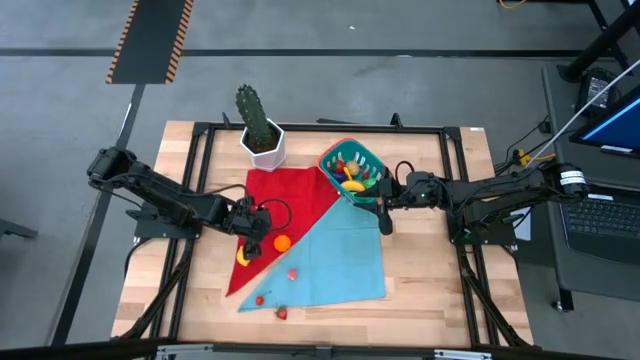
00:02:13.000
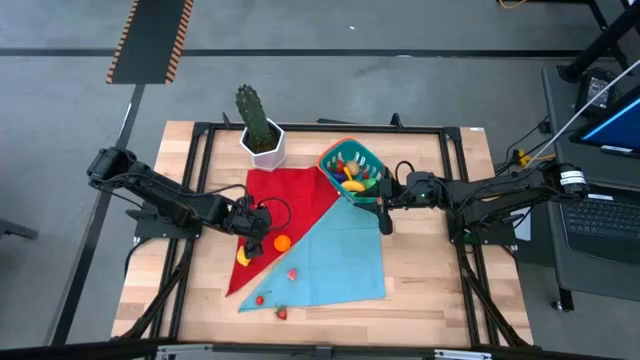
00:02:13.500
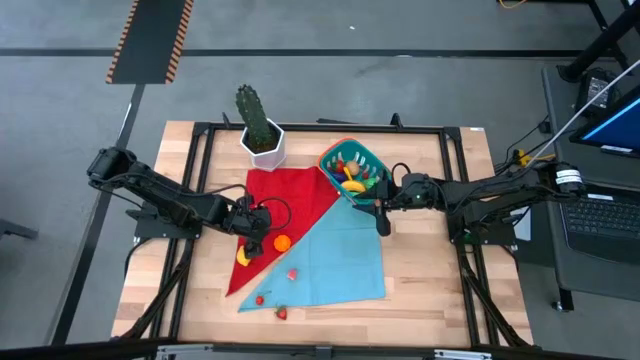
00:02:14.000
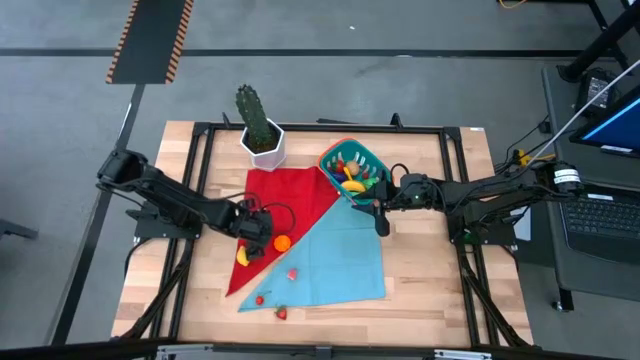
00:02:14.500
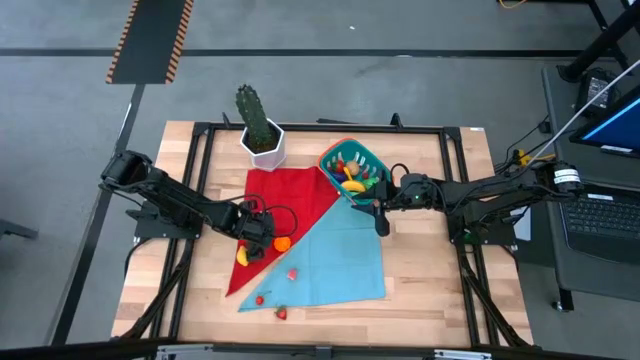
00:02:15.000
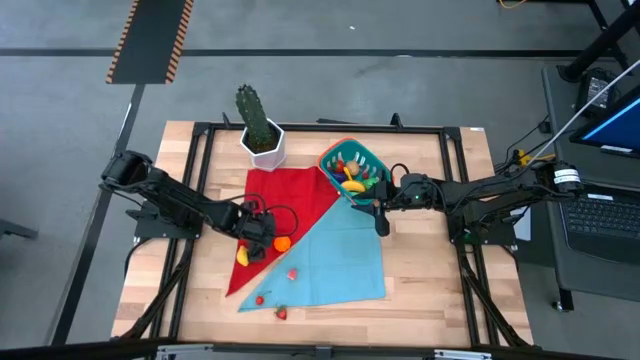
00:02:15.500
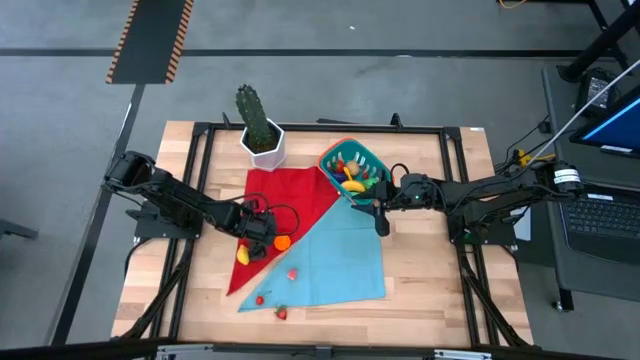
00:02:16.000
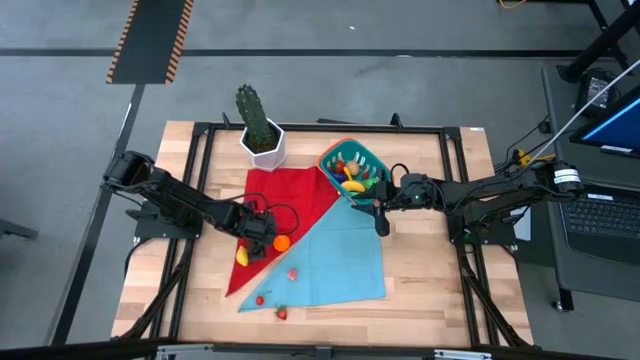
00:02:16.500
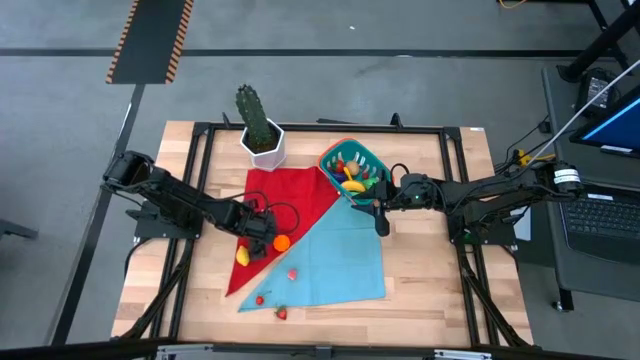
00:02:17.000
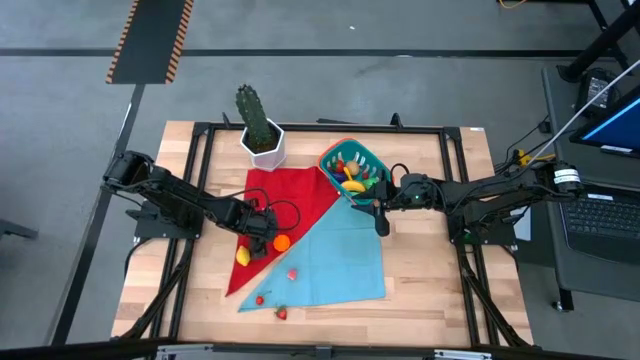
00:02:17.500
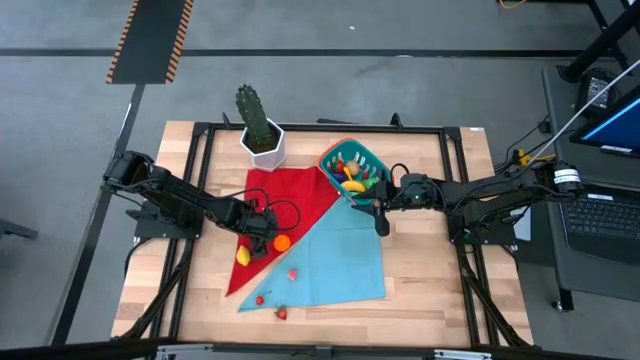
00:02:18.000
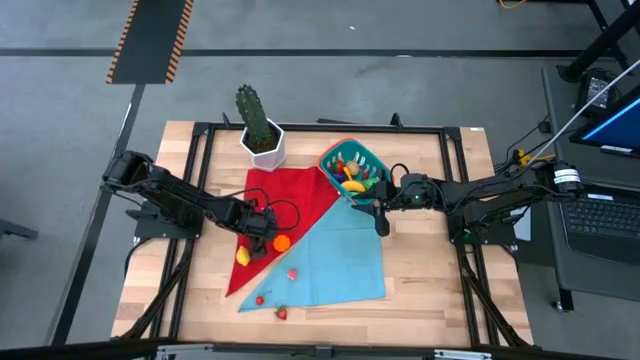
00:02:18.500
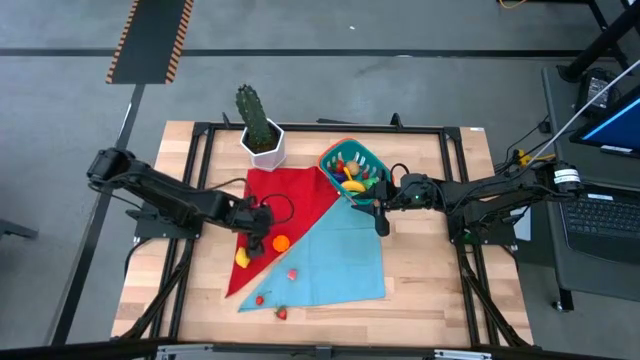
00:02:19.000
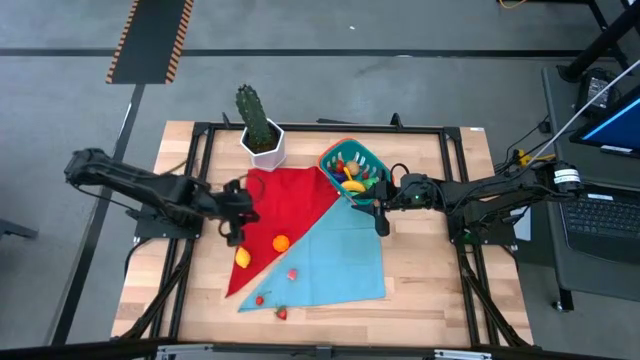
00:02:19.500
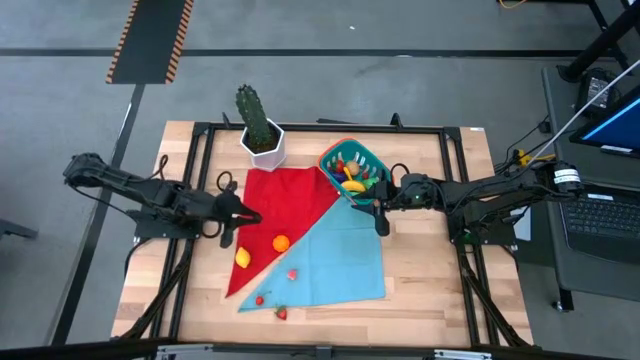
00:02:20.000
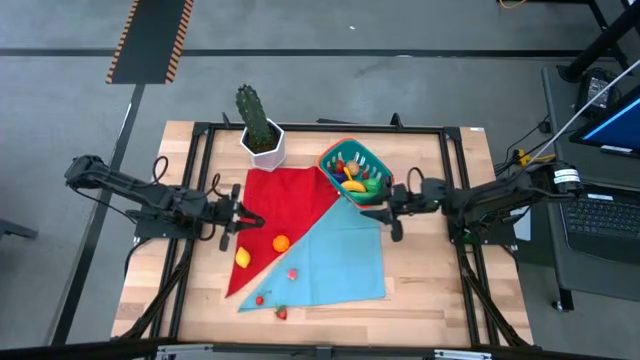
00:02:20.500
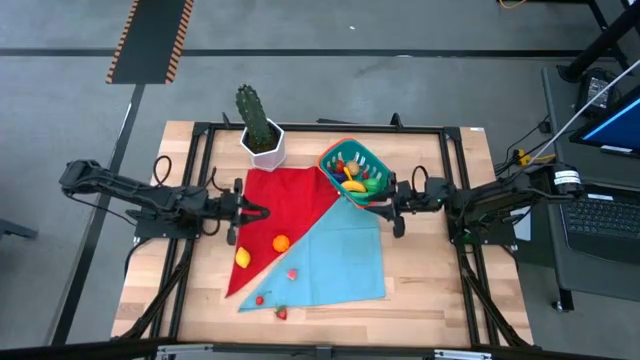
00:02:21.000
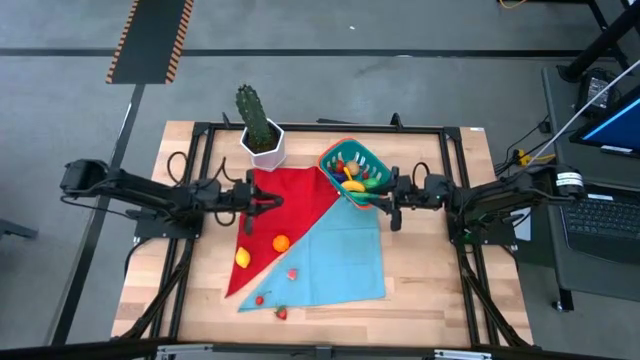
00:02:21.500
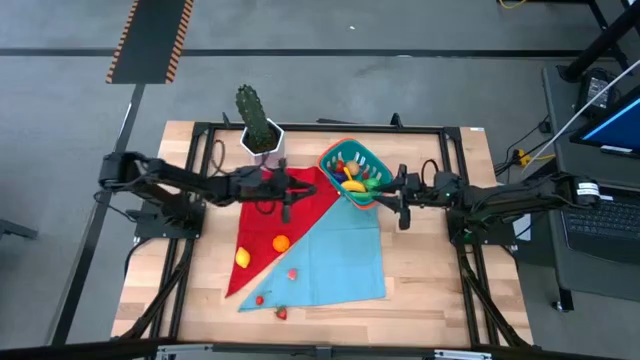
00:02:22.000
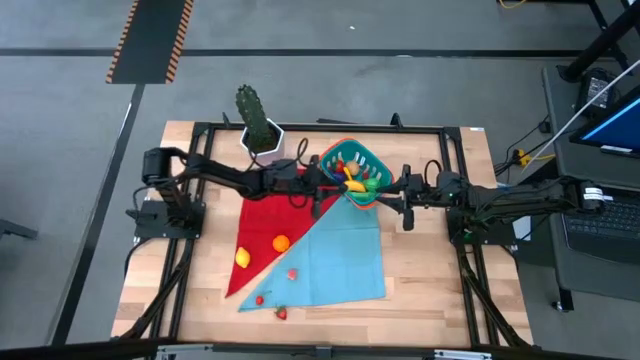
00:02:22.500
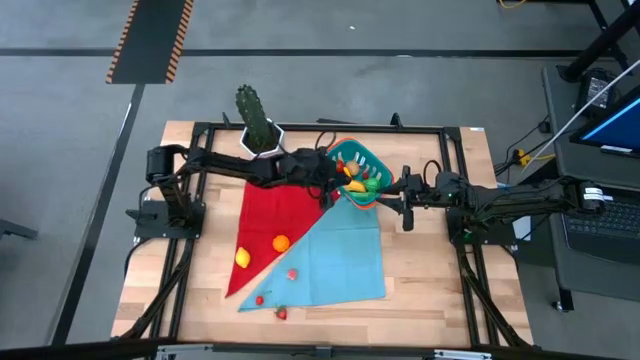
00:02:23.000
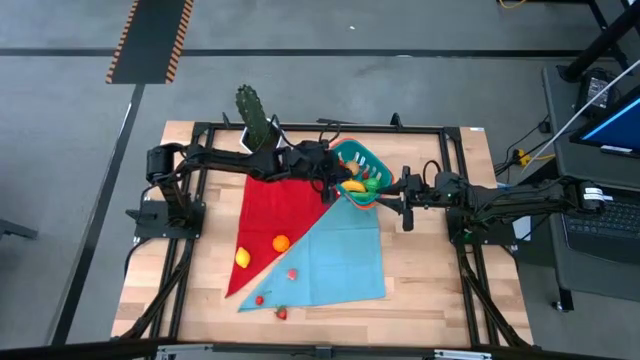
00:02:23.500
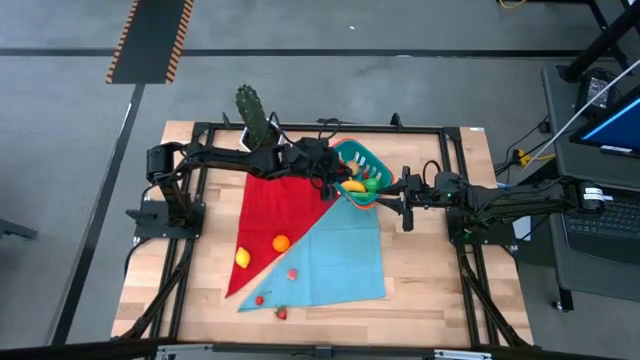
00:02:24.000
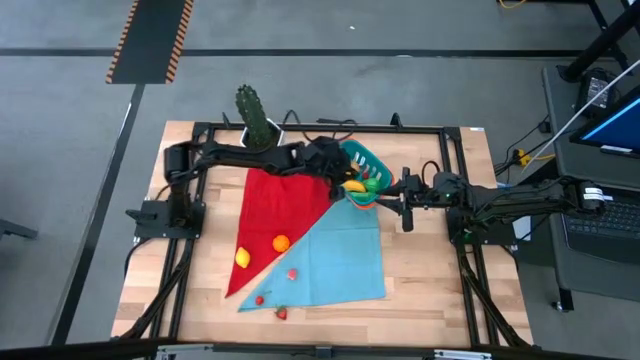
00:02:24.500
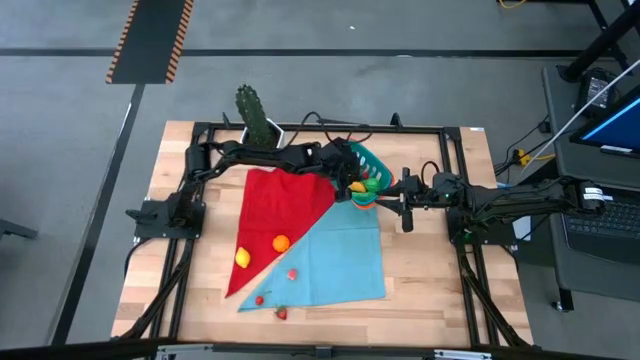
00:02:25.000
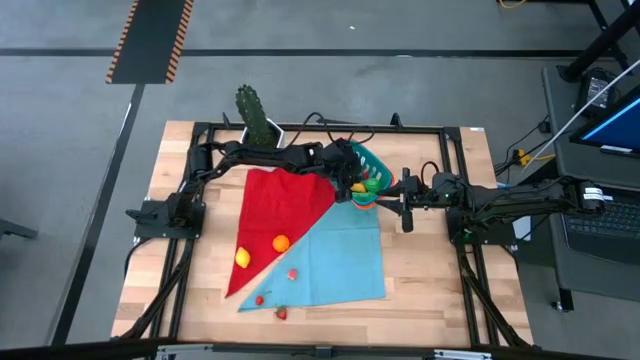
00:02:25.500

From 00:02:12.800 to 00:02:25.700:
Task: Build produce basket
Put the black berry into the blue basket

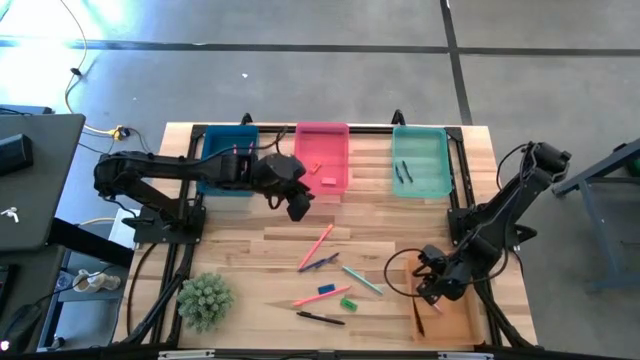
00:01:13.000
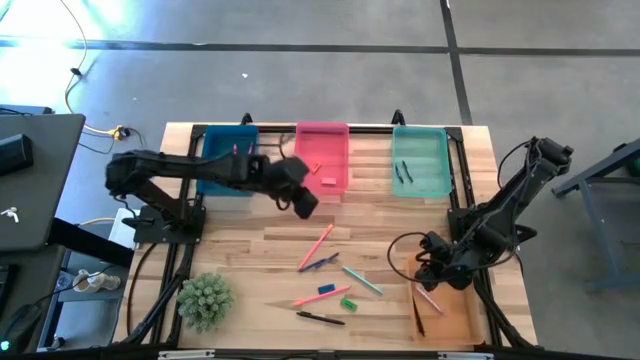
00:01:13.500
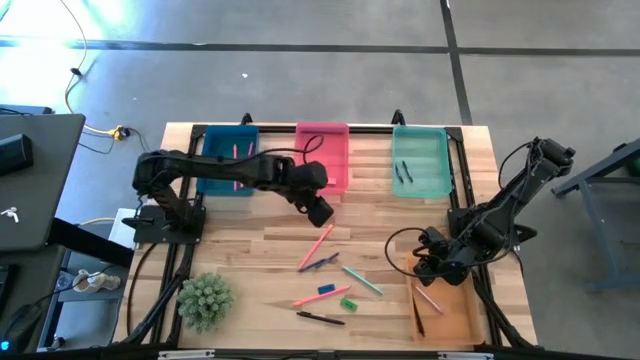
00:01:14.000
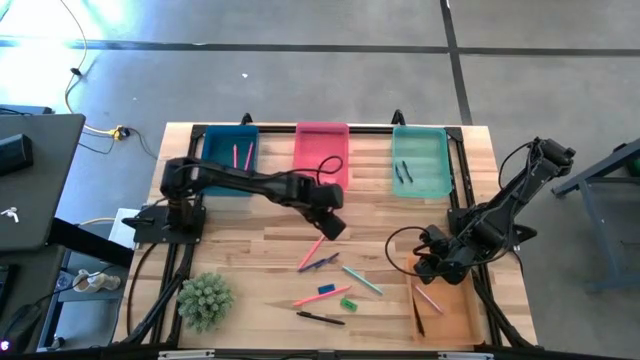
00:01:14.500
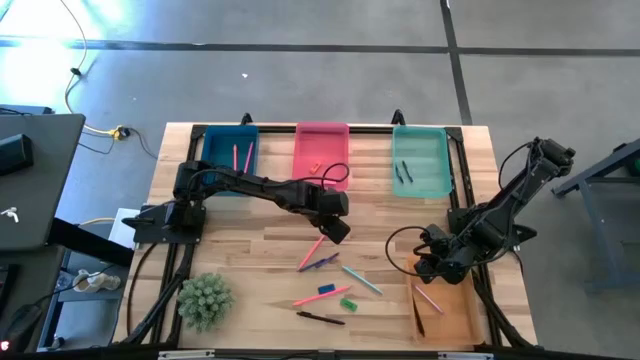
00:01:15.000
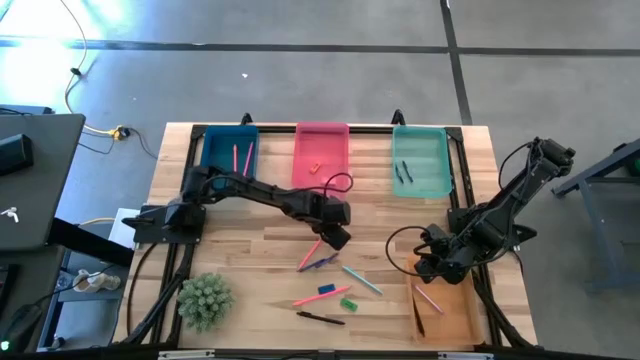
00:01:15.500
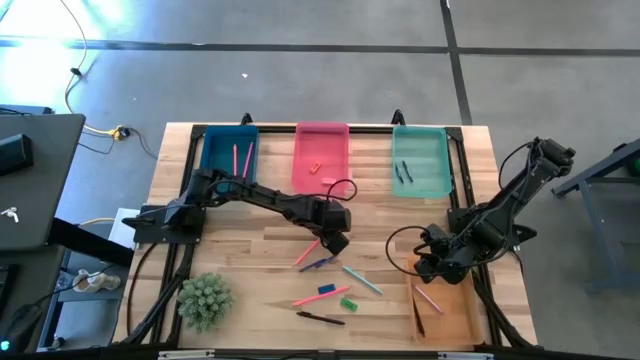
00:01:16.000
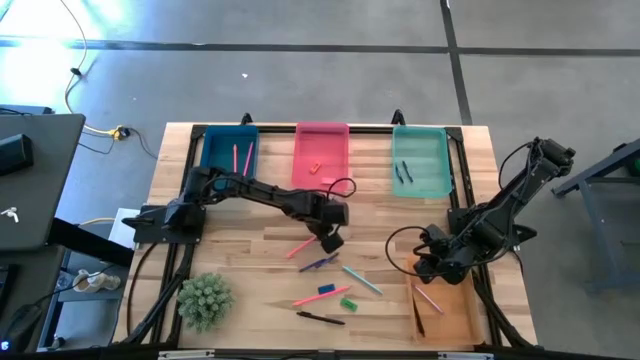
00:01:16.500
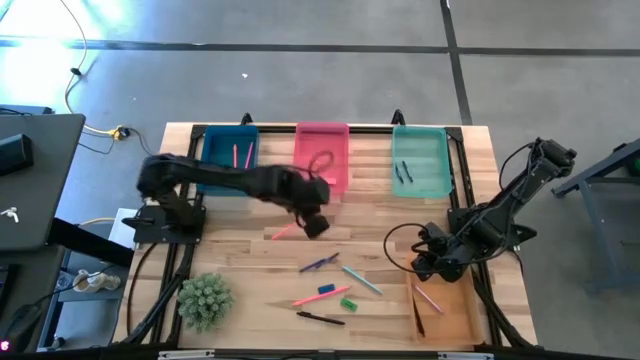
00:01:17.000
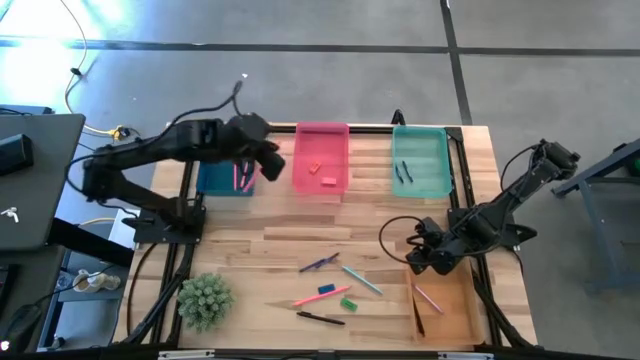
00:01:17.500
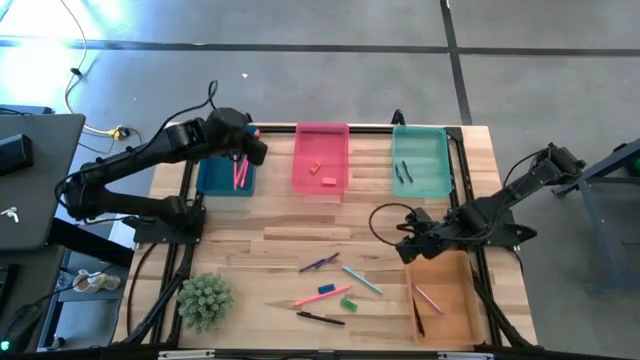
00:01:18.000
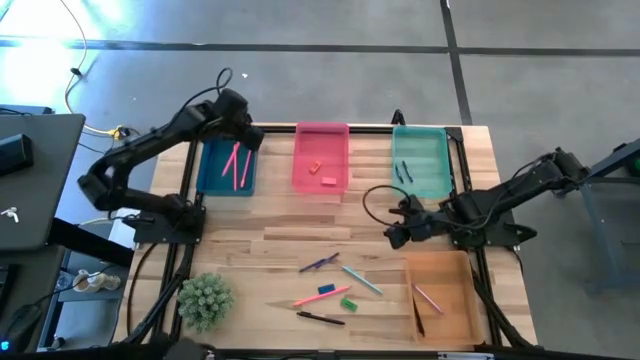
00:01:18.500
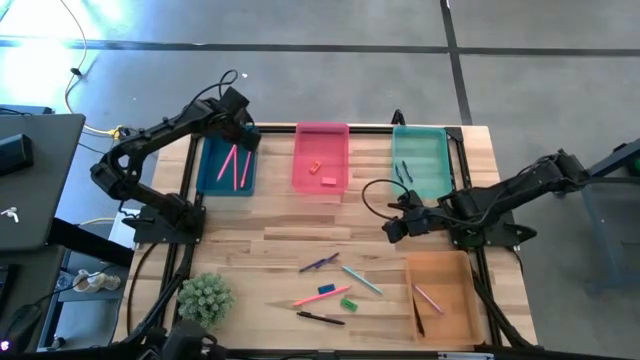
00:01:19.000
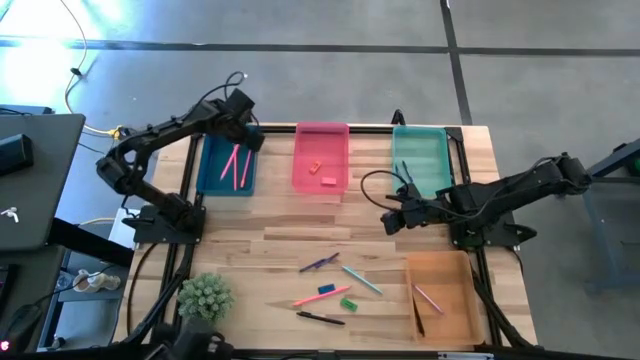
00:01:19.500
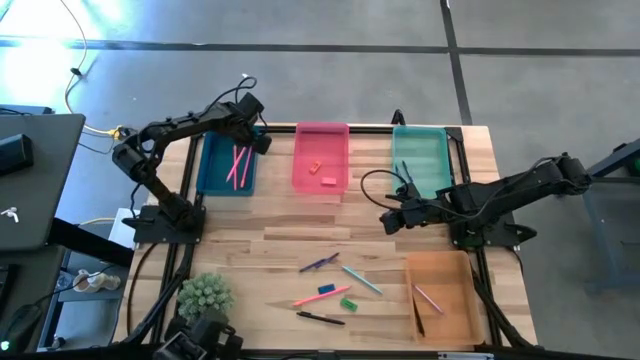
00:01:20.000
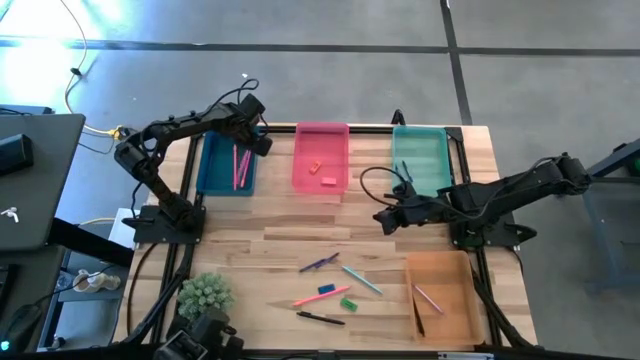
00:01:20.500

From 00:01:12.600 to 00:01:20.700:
Task: Sort crayons/erasers/pens/pencils in bins
Put the pink pencil into the blue bin

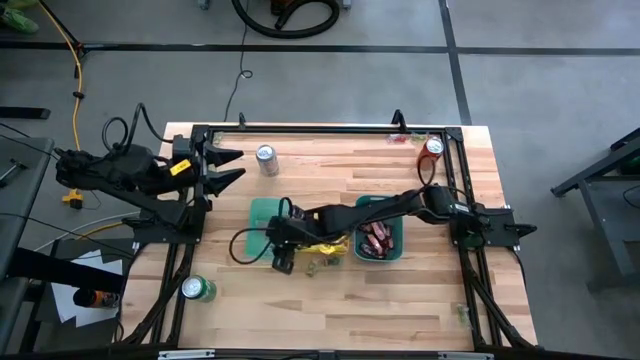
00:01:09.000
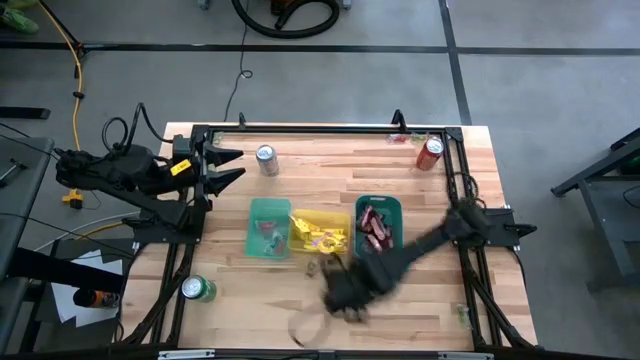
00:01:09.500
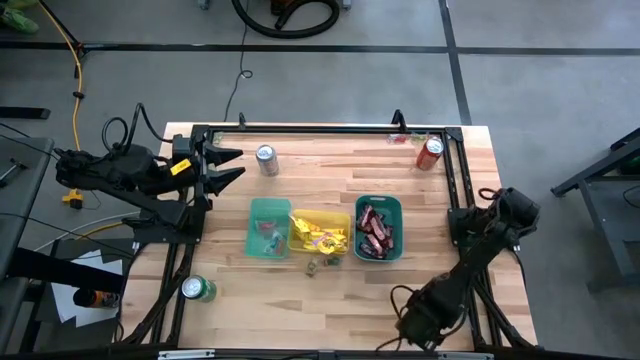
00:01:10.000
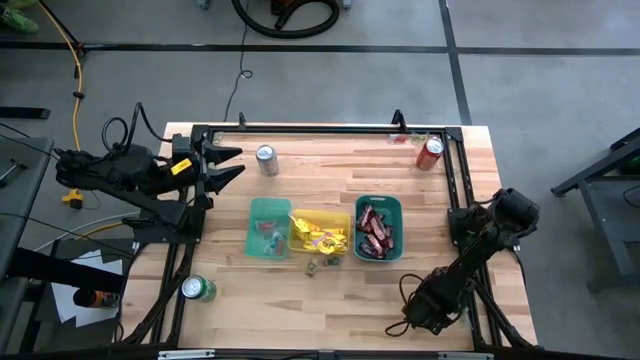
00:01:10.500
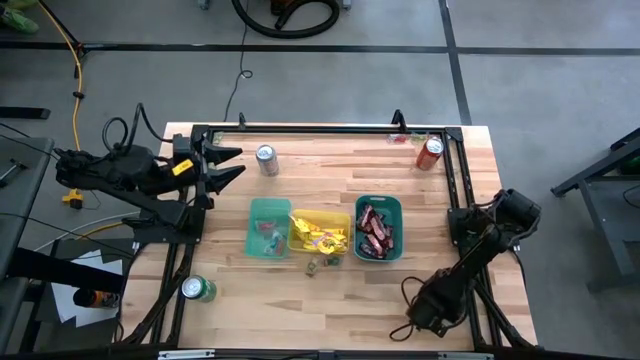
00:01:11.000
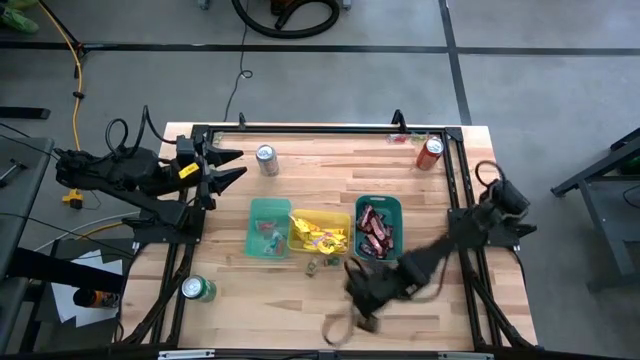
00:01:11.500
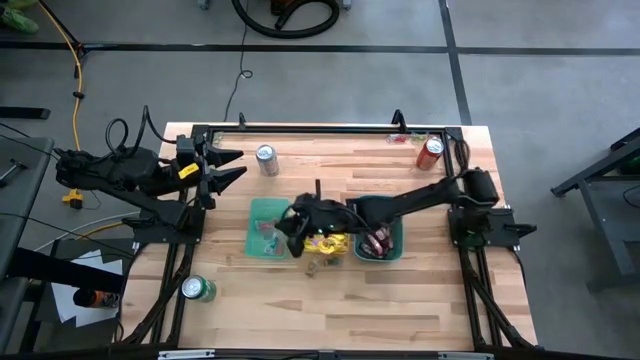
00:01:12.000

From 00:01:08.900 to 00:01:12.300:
Task: Sort candy
Put the green gummy into the green bin
